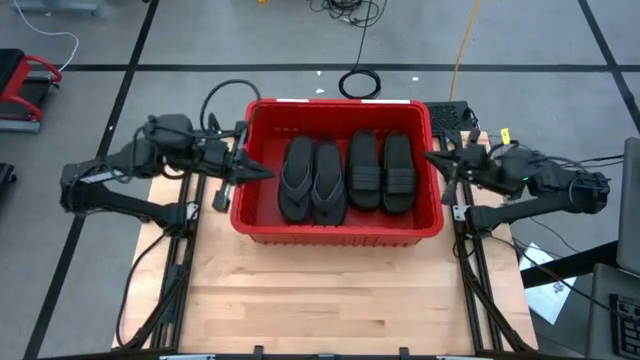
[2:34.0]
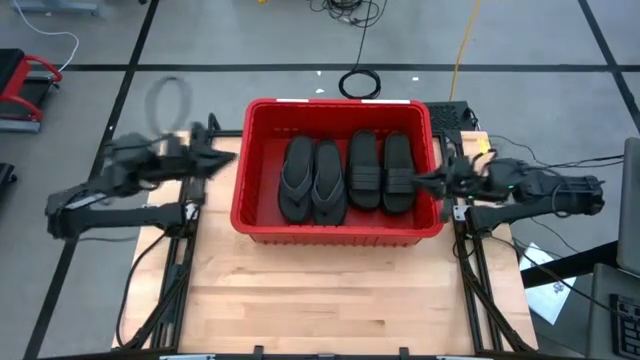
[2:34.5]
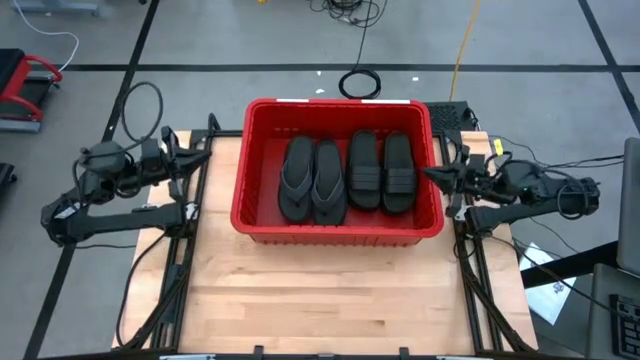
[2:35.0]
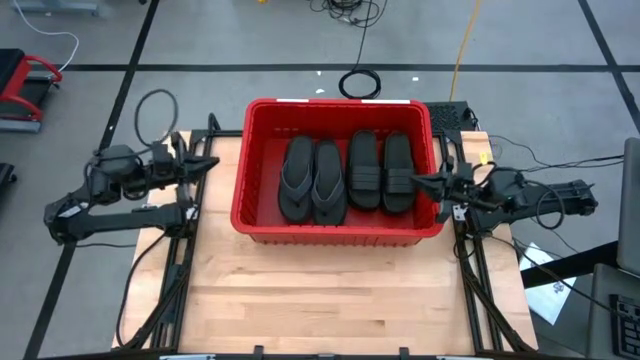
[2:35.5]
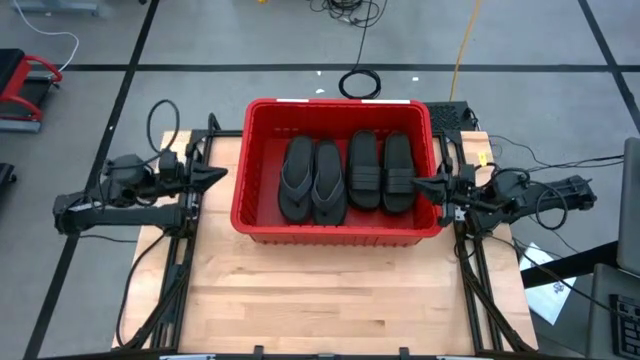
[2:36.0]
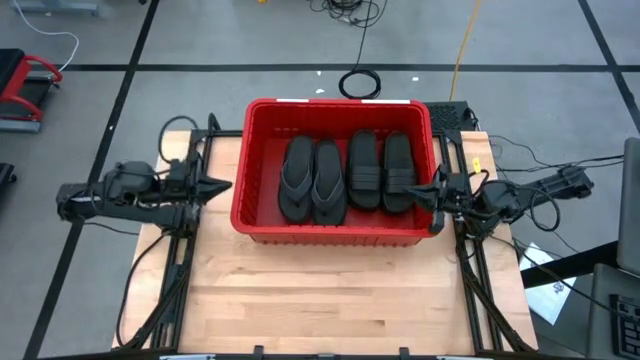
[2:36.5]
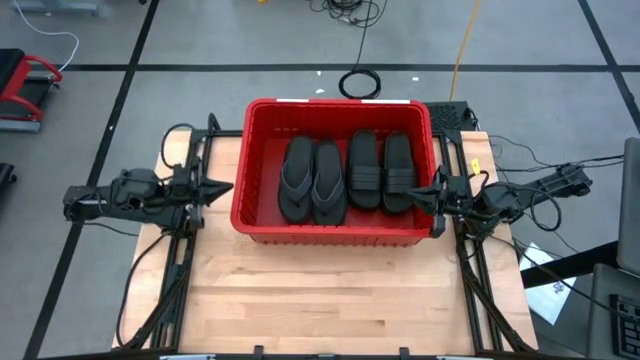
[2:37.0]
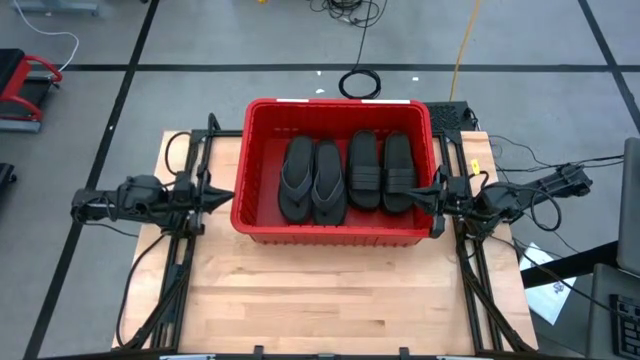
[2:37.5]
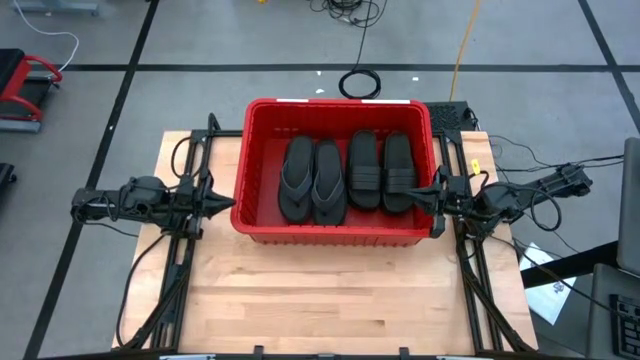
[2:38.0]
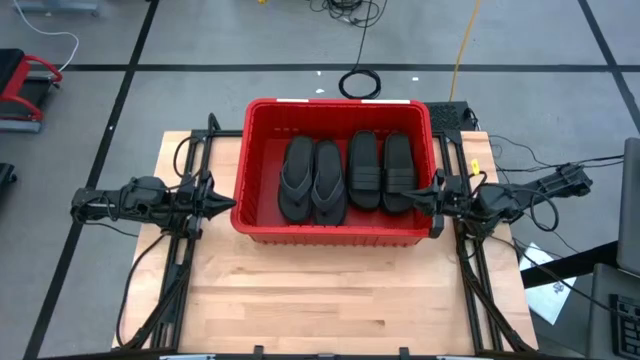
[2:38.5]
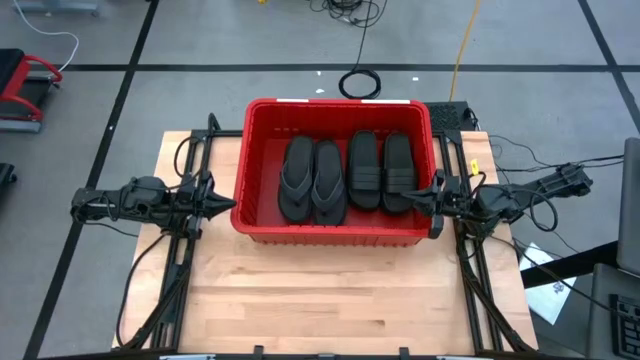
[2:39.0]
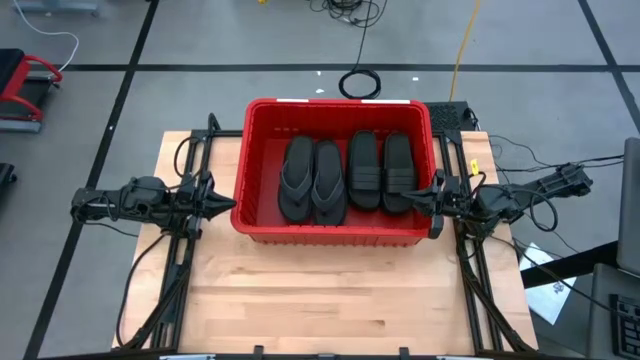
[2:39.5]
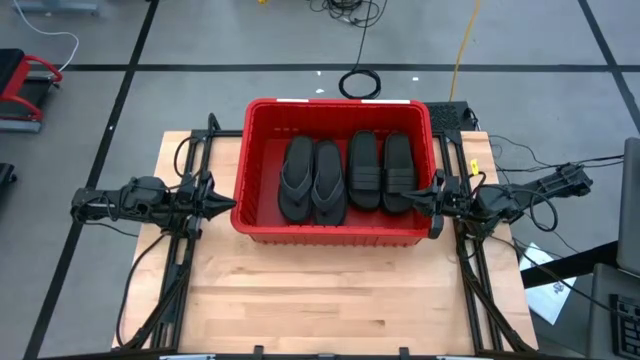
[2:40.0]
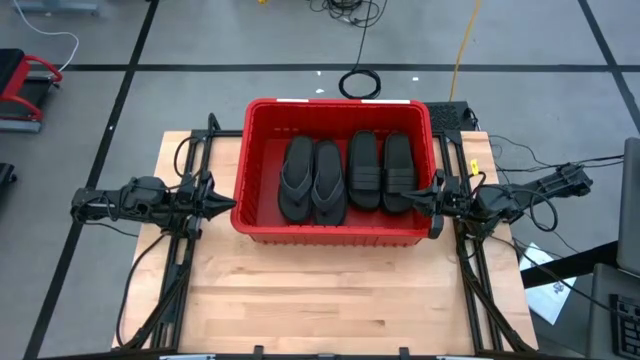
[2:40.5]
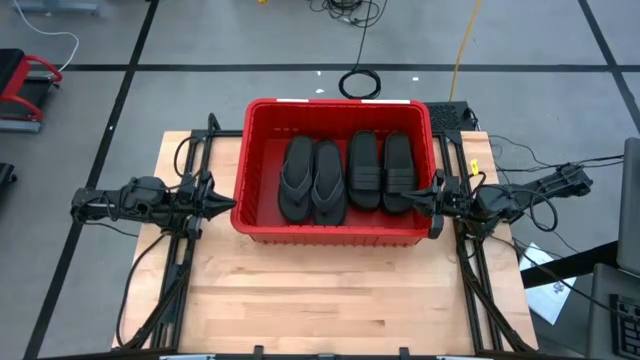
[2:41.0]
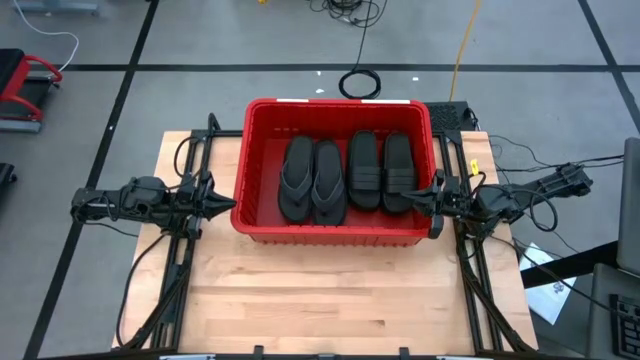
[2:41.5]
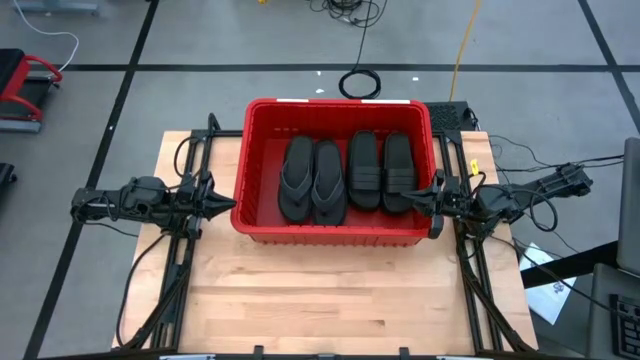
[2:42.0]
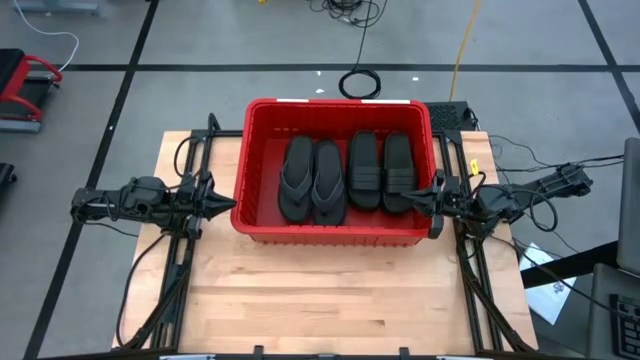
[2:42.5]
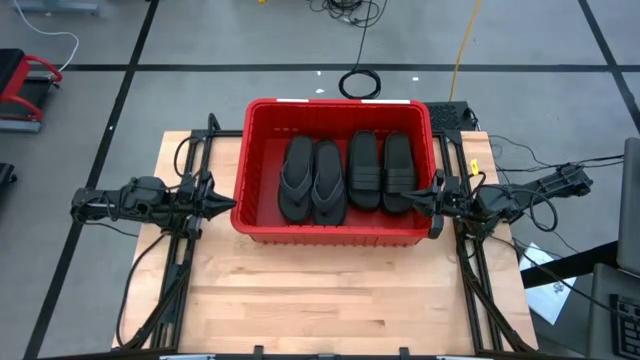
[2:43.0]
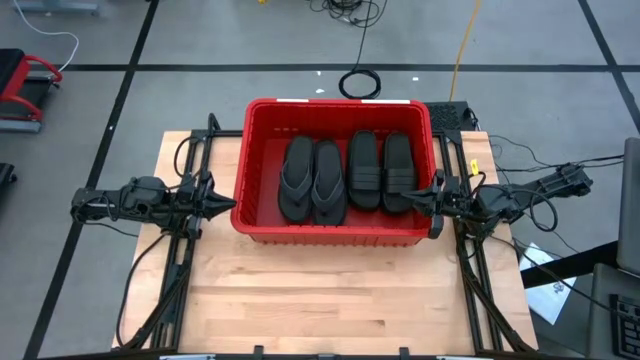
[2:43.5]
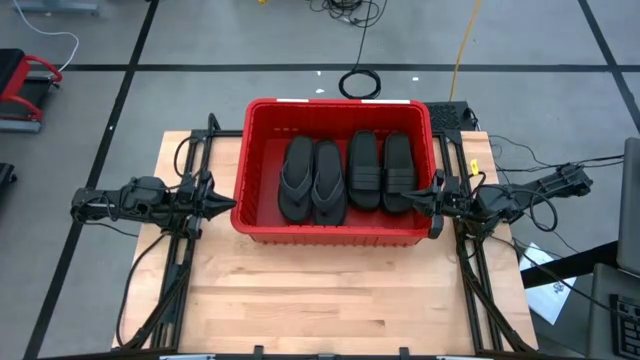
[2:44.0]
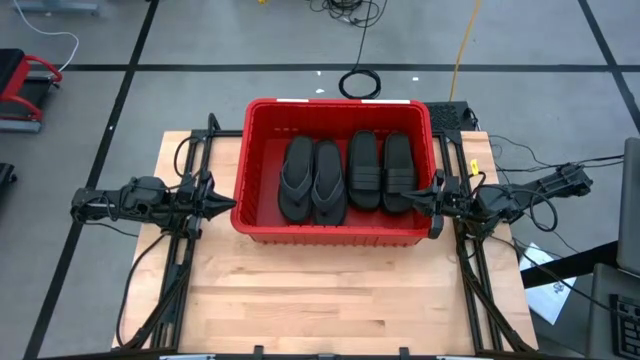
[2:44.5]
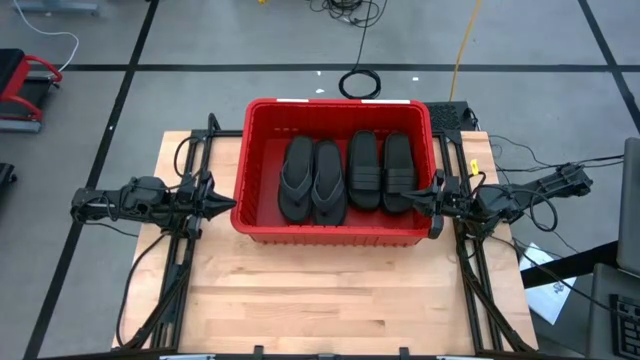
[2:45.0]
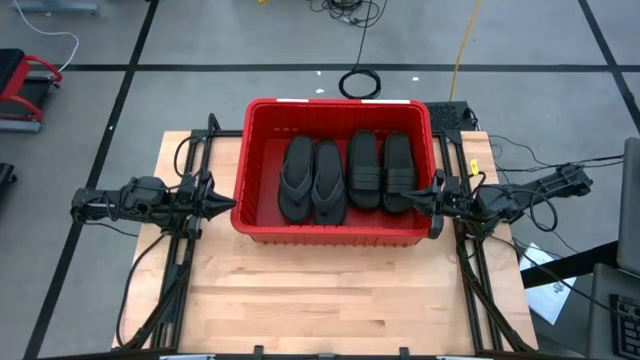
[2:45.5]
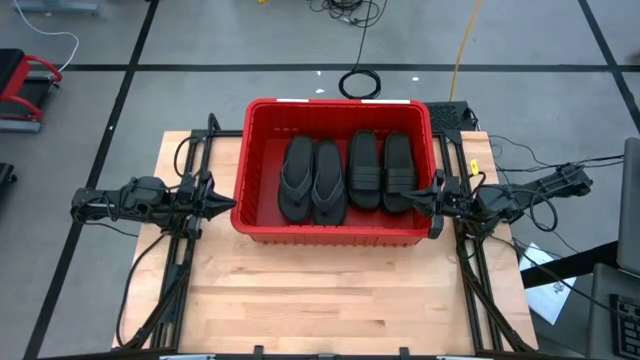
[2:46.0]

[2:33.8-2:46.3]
Task: Pick and place slides into bin
Return to Home Position

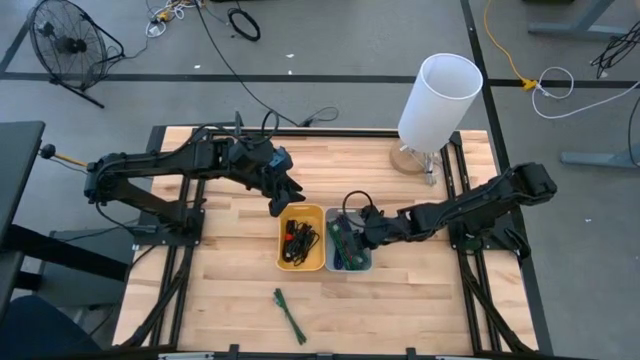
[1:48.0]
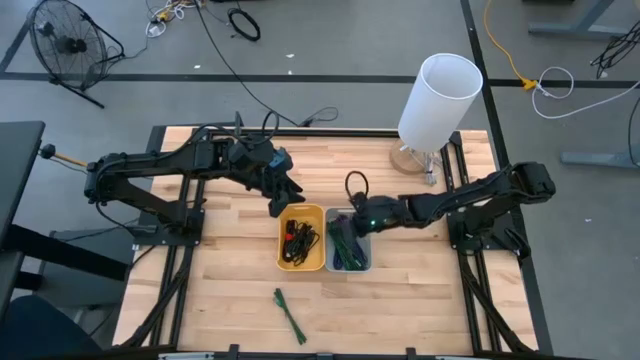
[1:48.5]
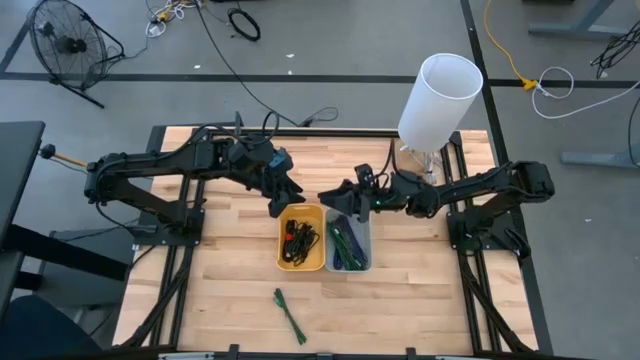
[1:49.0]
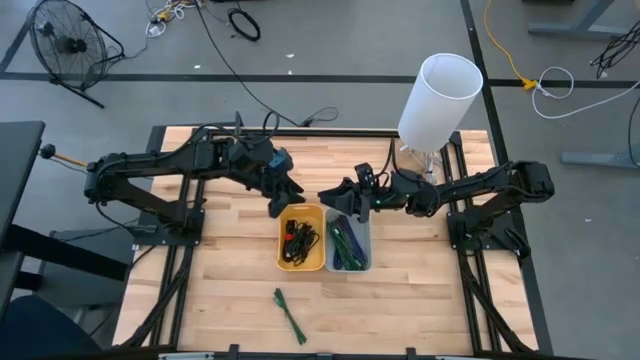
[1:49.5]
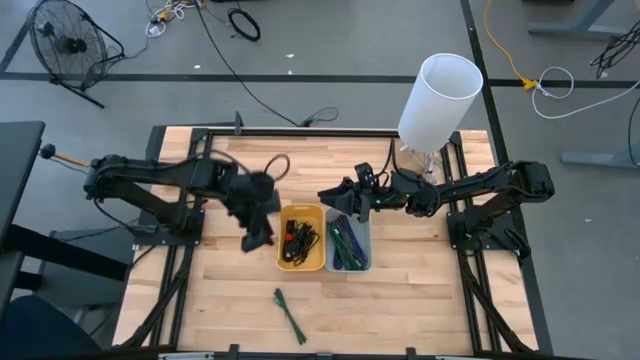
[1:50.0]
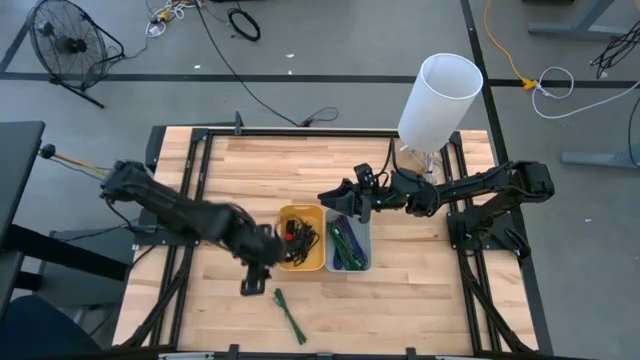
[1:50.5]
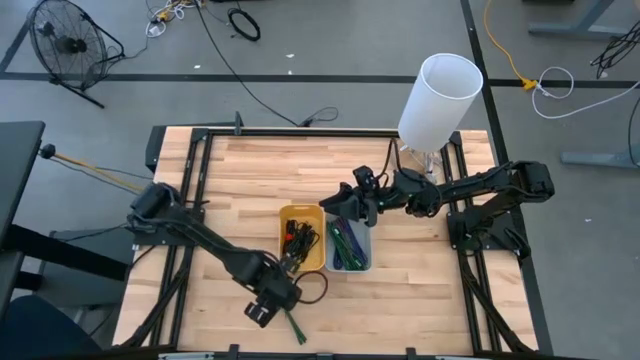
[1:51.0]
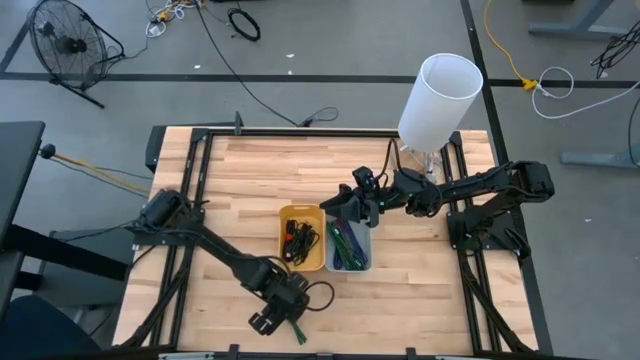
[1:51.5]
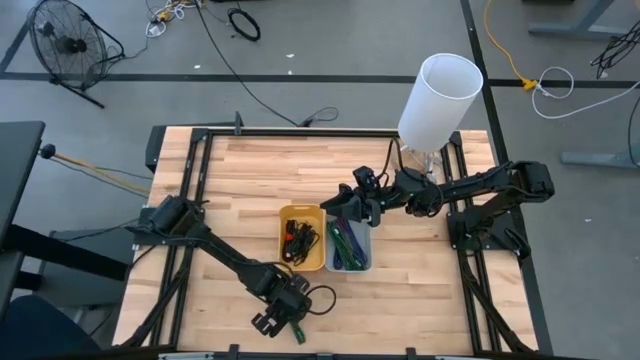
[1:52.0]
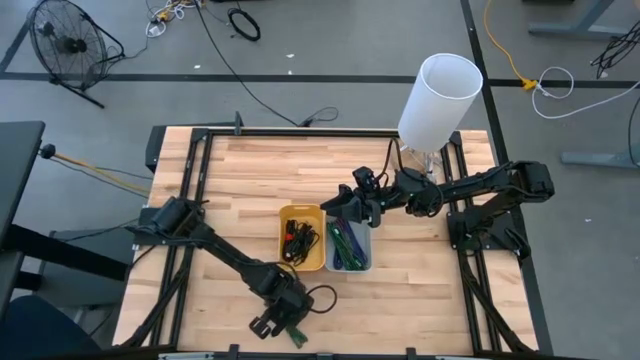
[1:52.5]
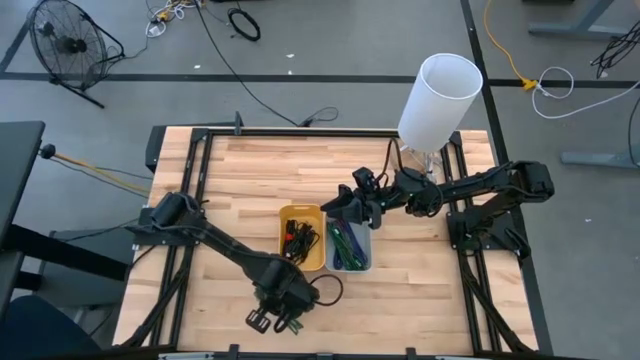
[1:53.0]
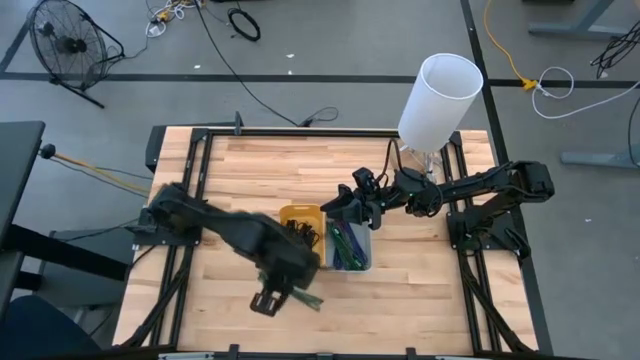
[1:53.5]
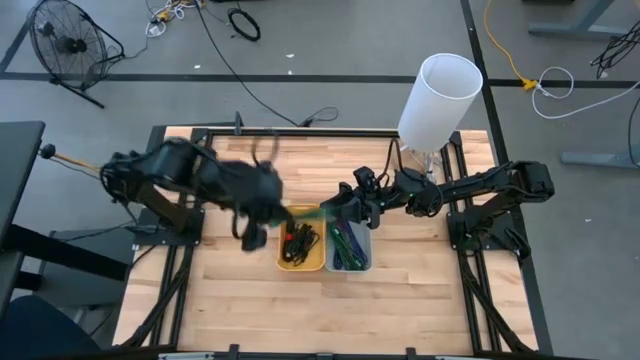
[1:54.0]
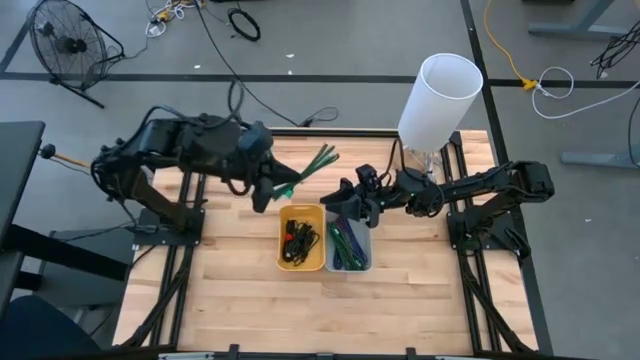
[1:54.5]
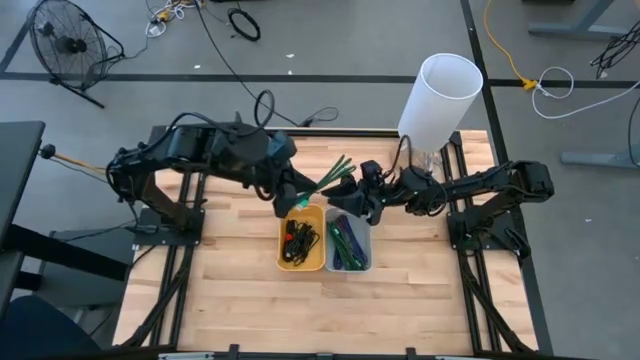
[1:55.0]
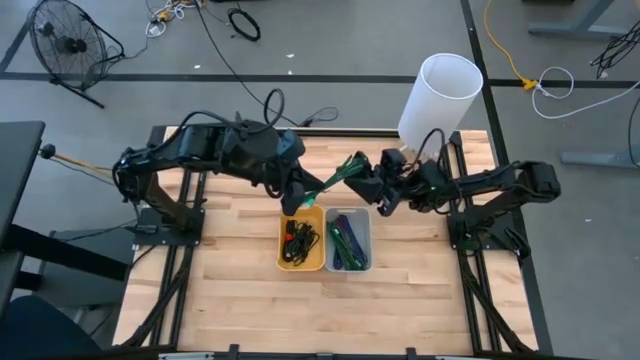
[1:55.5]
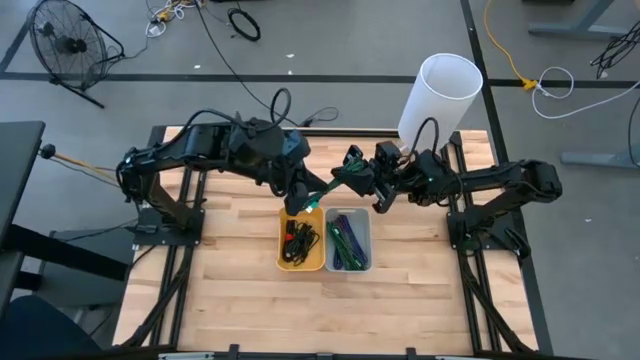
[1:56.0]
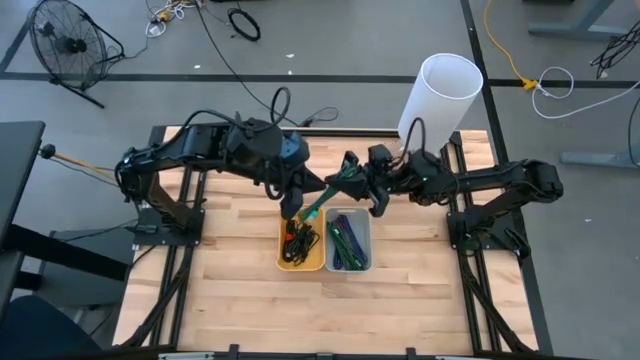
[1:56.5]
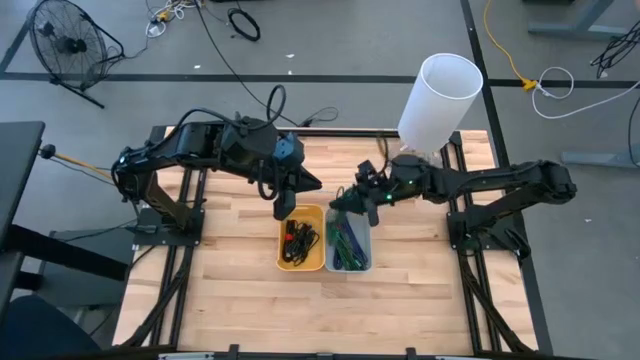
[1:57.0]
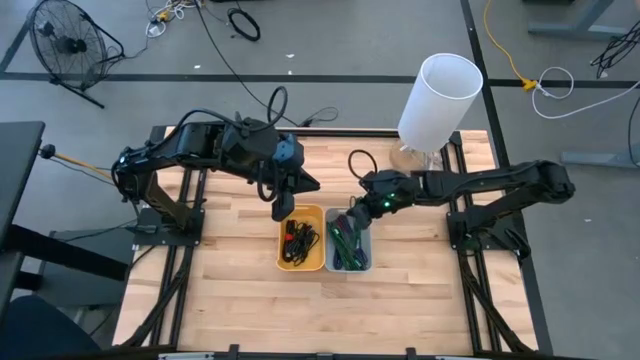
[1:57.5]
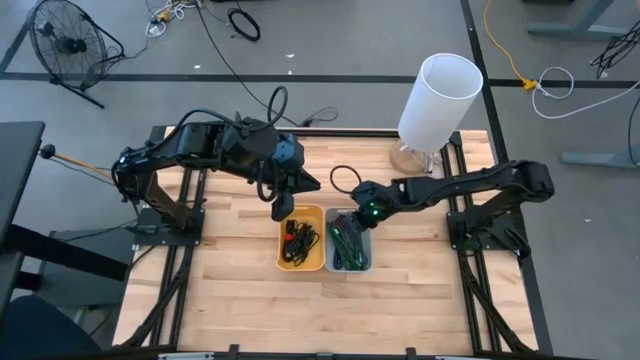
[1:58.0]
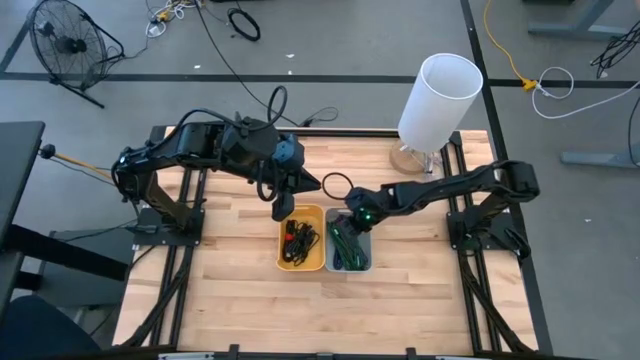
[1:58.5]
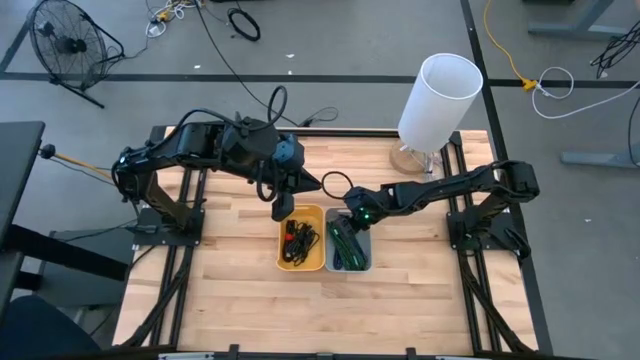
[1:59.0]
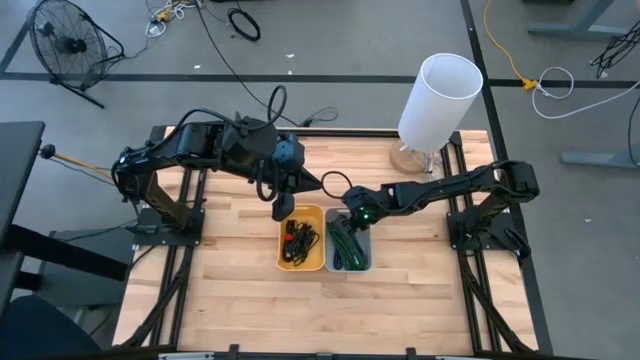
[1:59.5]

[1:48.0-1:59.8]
Task: Pick & Place USB Port
Put the black green charger cable into the gray bin
